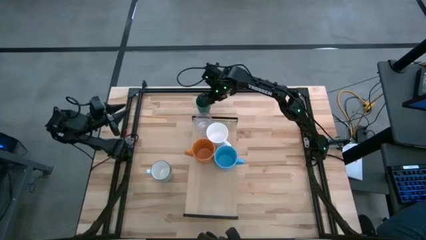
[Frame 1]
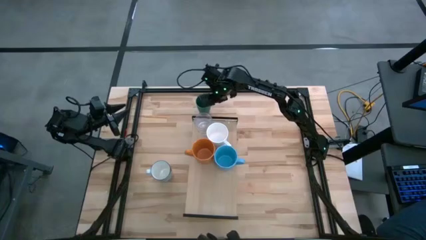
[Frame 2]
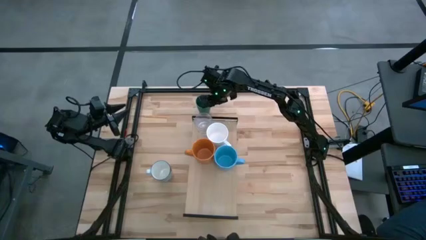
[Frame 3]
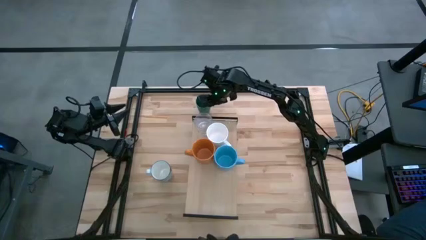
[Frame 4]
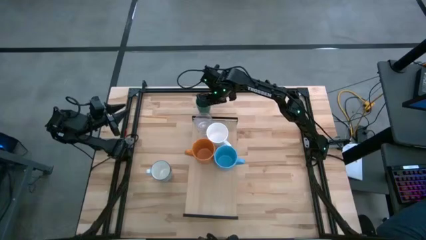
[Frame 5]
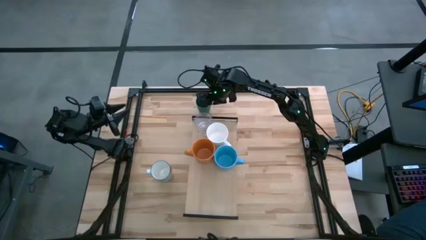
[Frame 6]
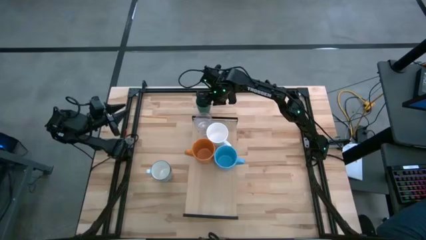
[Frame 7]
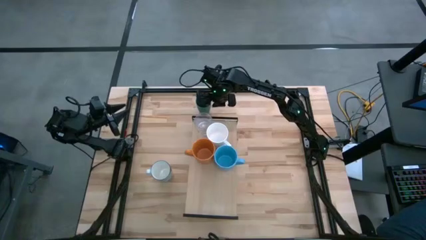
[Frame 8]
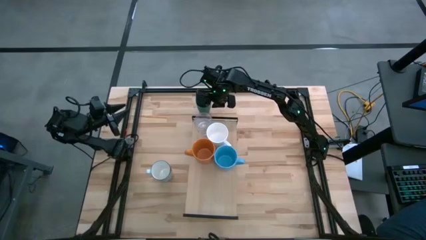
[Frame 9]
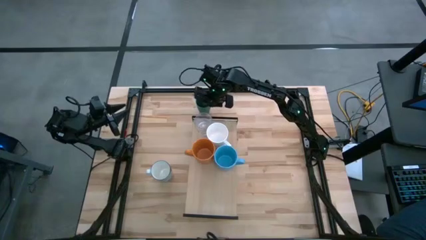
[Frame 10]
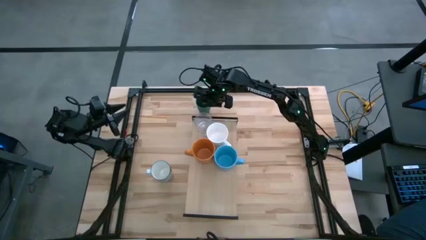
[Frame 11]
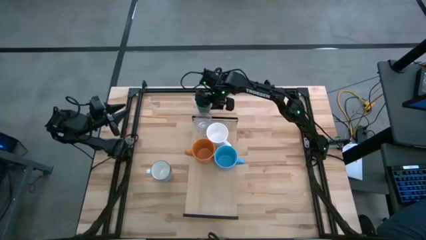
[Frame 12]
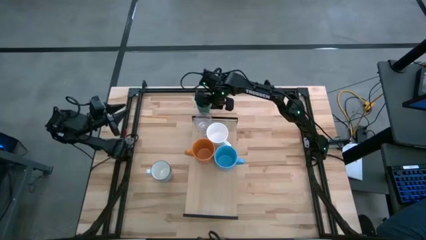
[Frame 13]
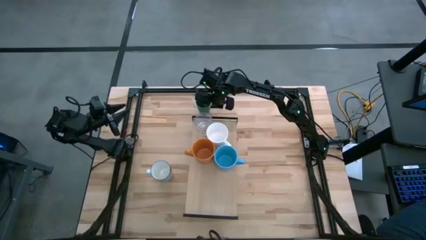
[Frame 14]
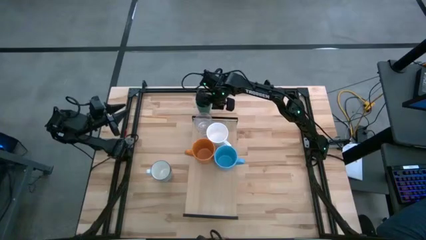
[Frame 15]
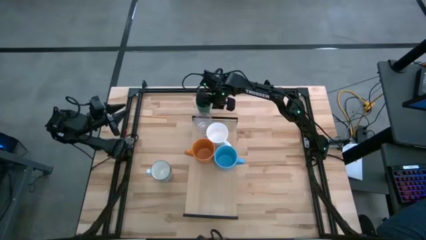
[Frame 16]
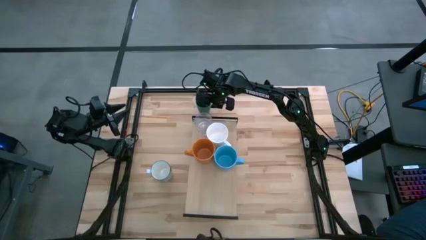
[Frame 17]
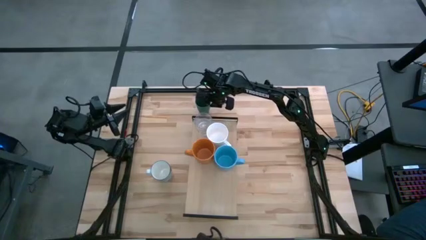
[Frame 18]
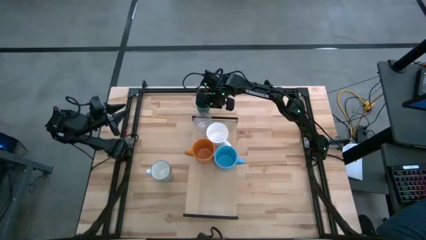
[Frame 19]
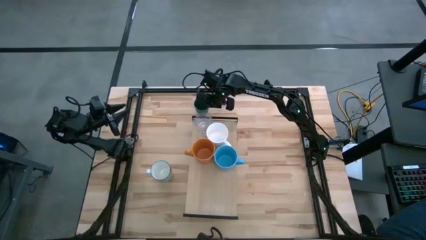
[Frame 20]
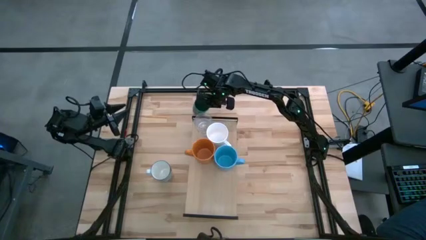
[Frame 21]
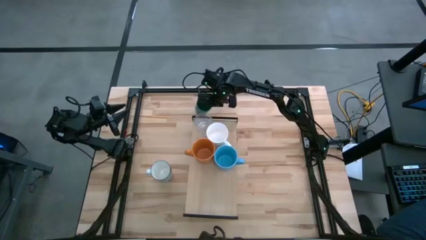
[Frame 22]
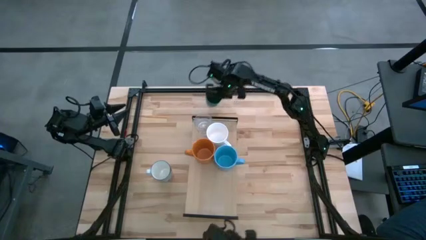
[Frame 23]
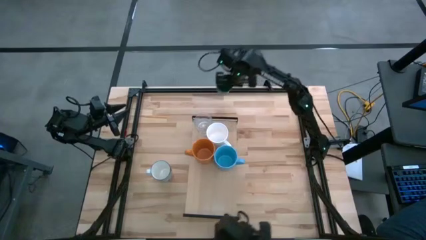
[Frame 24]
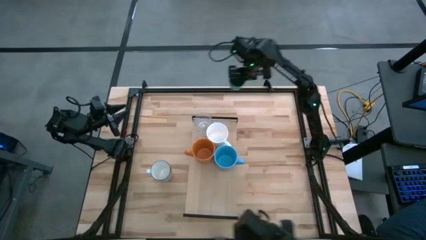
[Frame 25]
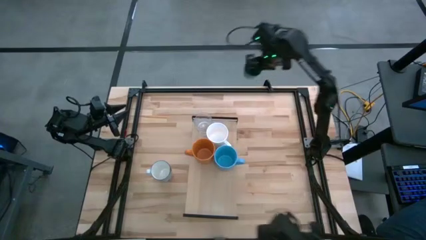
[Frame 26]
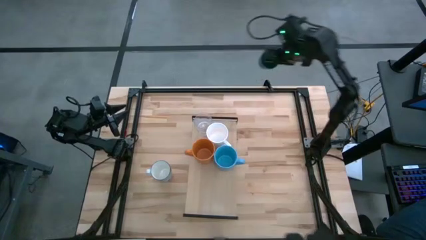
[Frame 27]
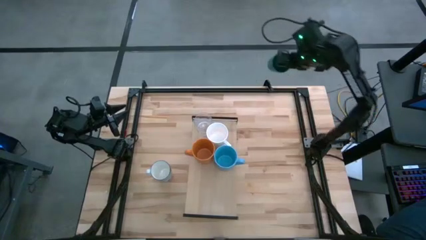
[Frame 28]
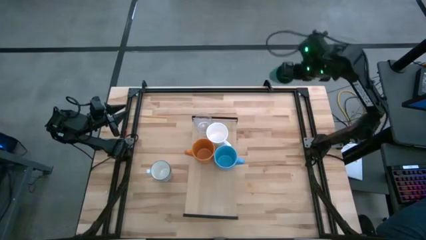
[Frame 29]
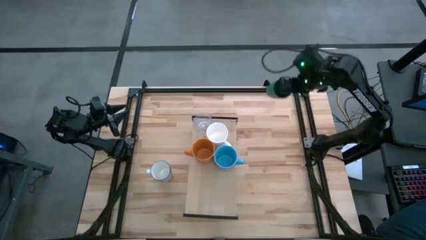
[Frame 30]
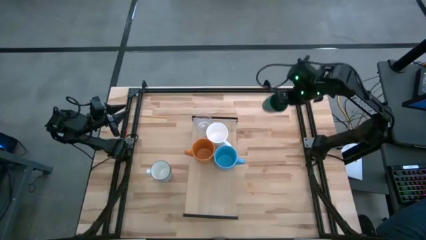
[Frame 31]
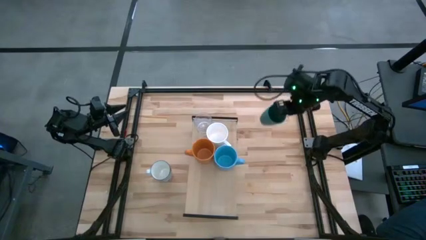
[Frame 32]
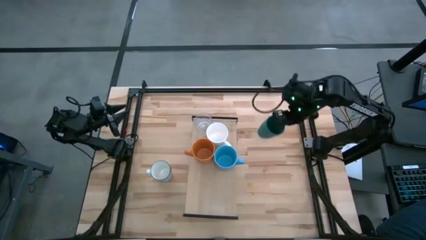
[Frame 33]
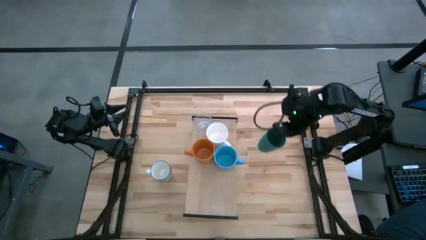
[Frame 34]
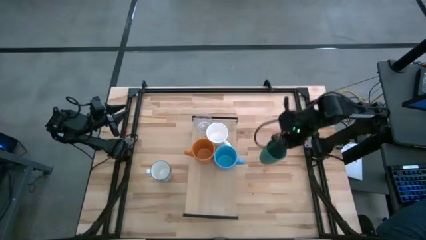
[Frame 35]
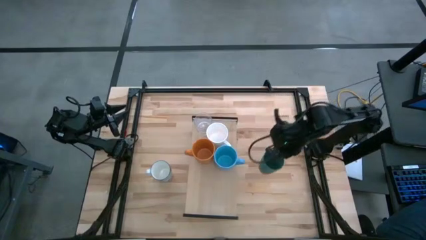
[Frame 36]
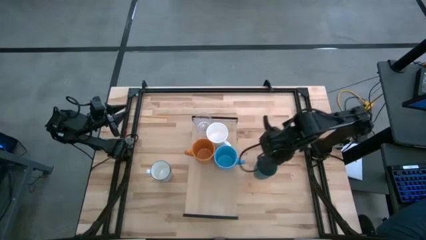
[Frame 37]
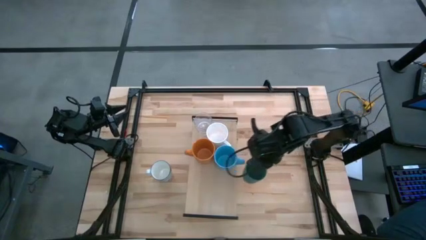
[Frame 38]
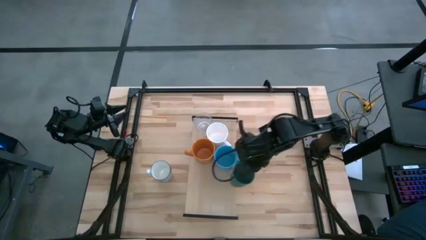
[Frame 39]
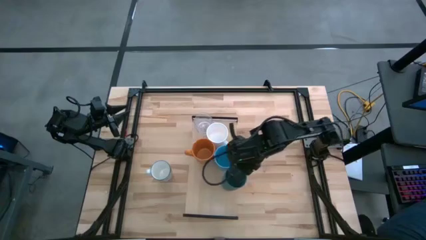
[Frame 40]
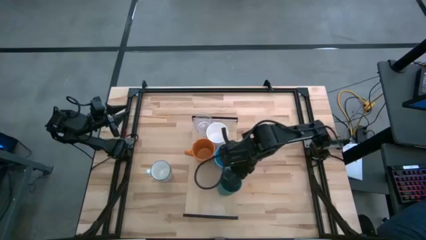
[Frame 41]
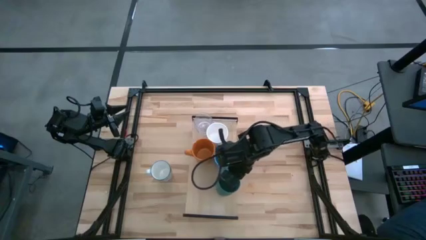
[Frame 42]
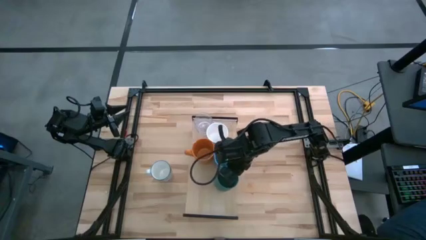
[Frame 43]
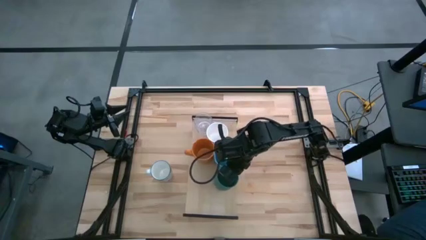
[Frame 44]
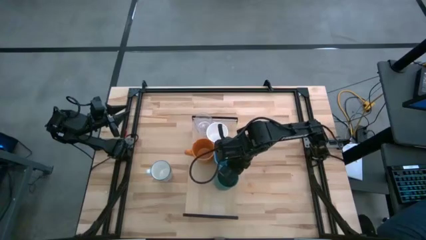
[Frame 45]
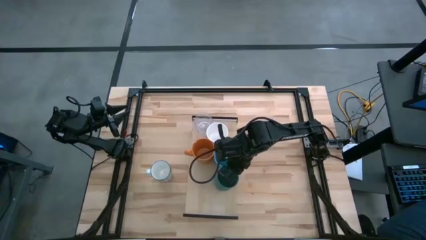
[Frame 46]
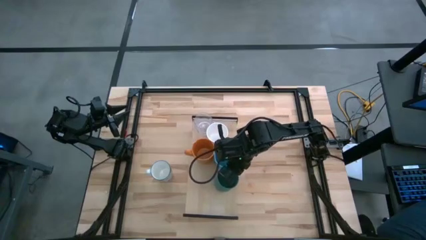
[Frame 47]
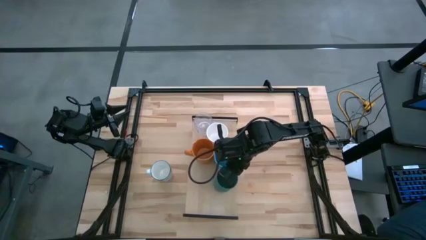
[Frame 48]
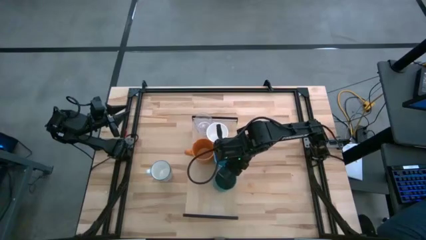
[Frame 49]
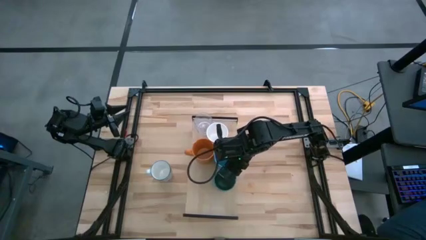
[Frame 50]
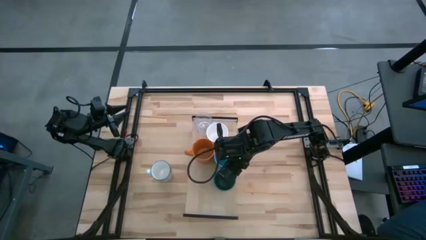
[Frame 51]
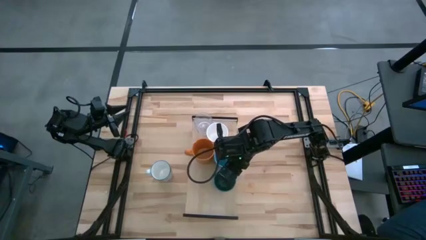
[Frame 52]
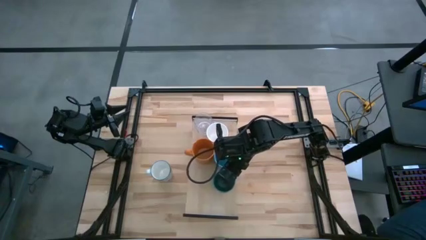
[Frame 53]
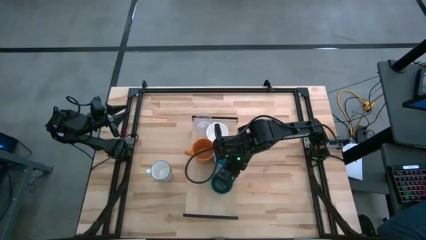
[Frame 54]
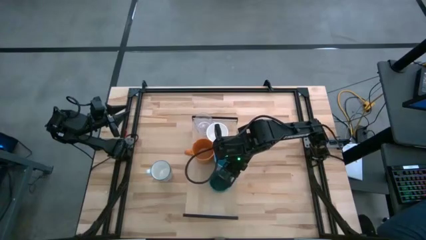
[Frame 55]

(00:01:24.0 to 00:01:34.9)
Task: Stack small to large cups/mugs on shelf
Put the green cup on the shelf

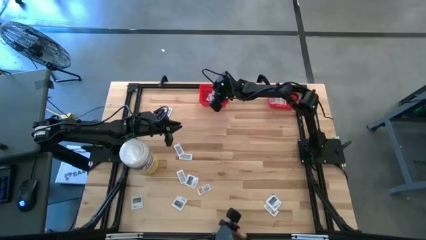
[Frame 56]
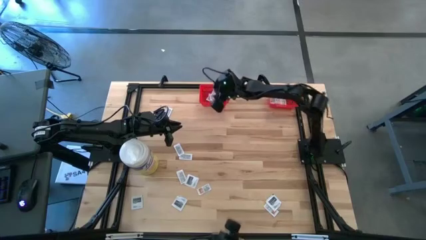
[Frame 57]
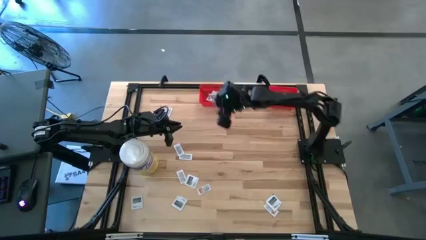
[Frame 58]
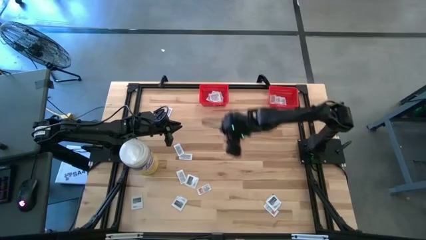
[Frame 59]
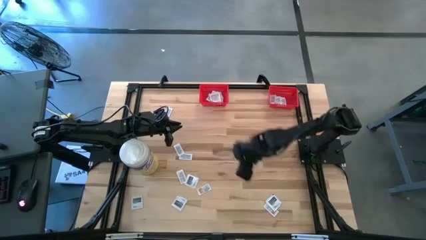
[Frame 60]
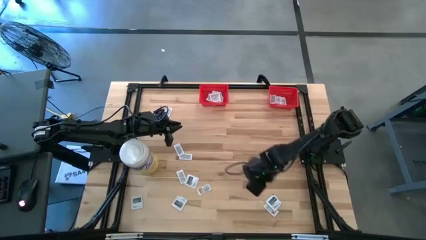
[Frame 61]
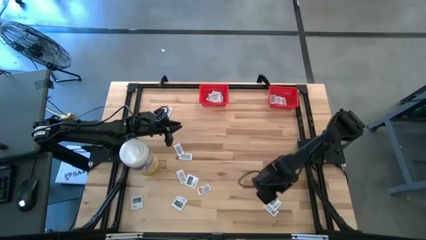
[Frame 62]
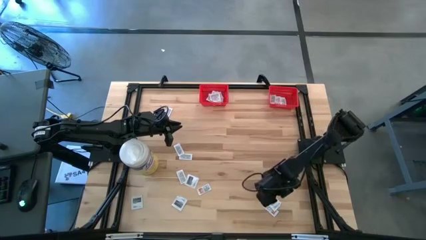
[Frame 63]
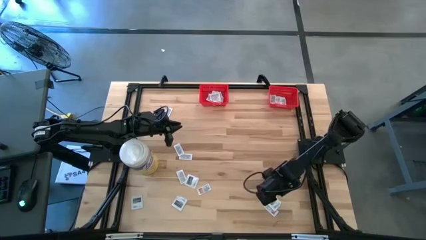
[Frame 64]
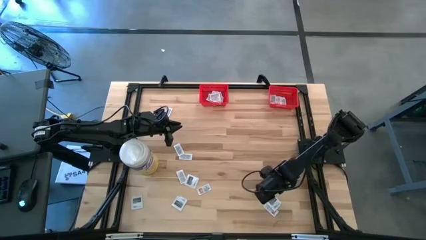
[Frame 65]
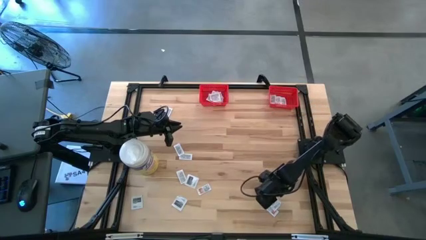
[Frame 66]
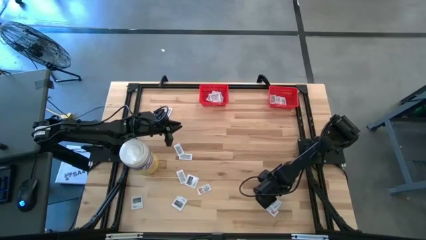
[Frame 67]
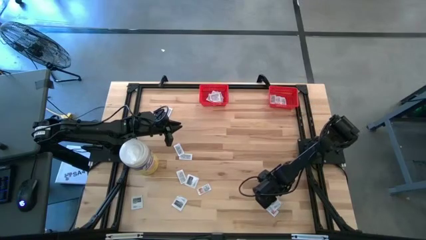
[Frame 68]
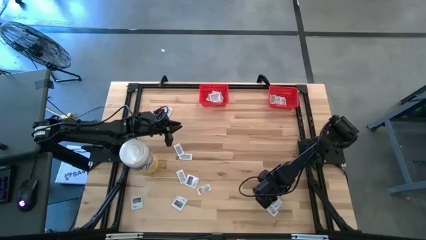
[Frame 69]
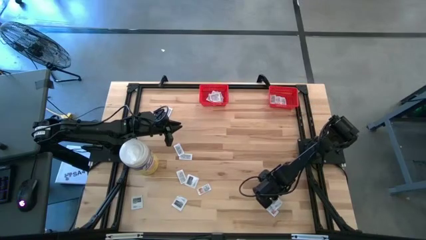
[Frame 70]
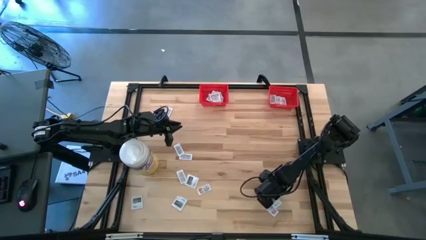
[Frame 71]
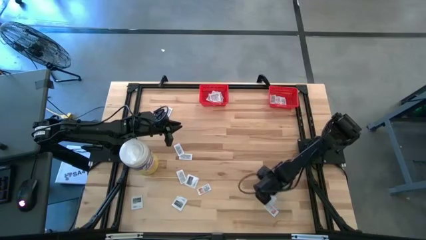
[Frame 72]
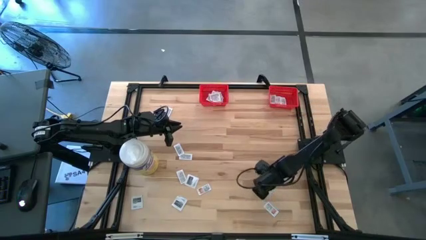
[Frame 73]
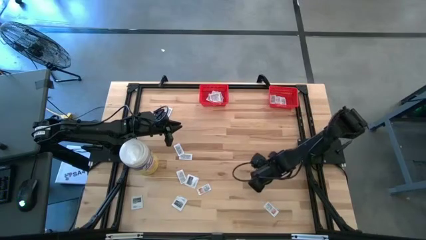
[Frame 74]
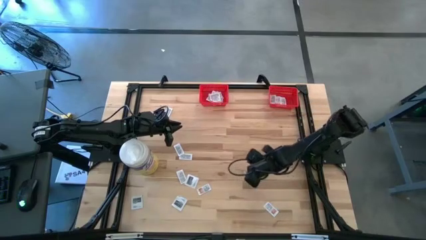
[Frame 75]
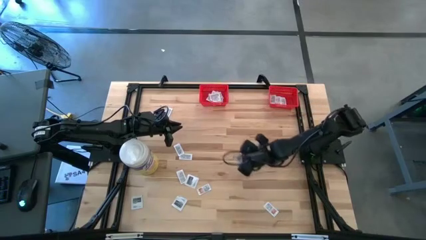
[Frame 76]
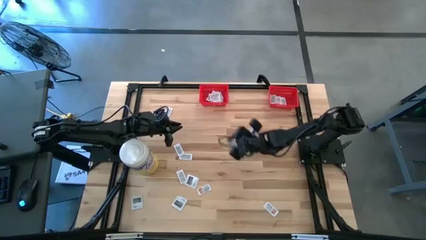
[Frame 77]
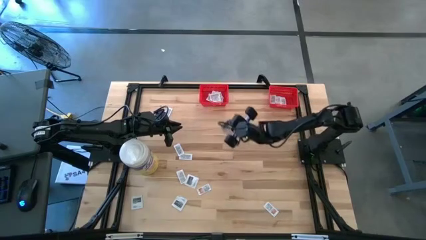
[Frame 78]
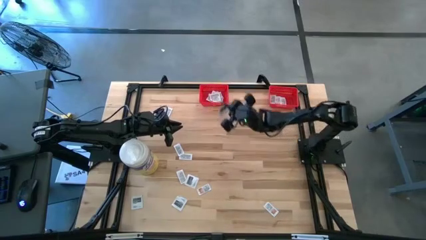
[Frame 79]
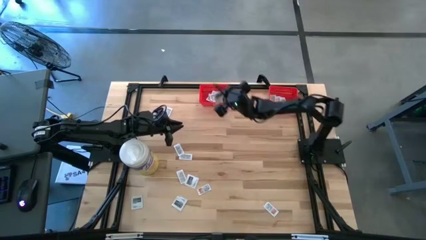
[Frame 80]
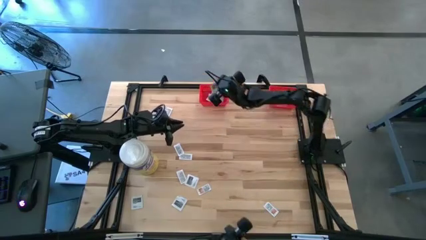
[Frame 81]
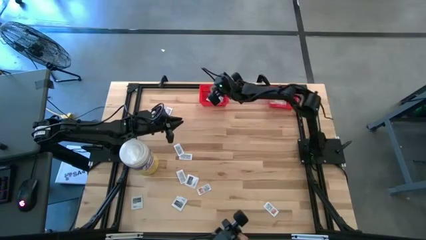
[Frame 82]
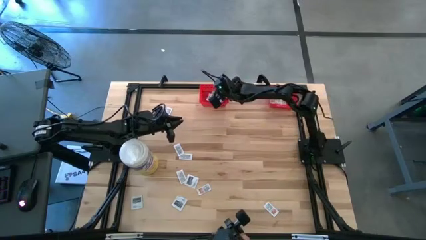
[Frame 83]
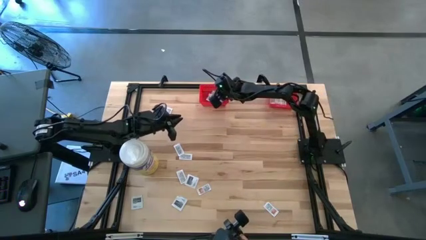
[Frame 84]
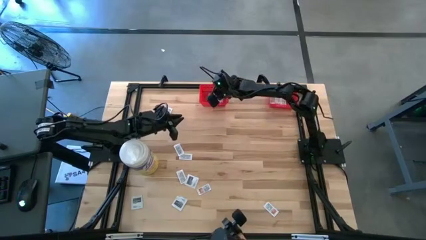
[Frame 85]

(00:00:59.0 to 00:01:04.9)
Task: Pick & Place First Aid Supplies
Put the towelette pack into the left red bin
